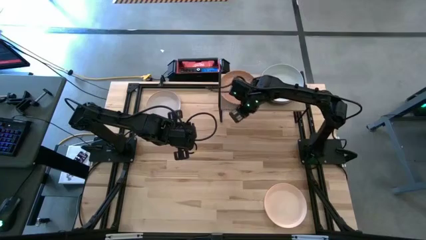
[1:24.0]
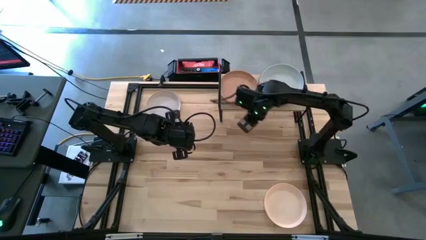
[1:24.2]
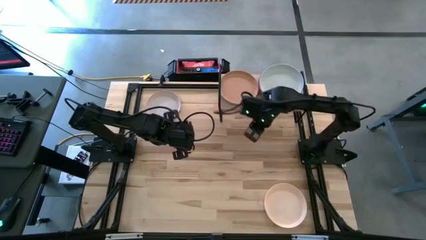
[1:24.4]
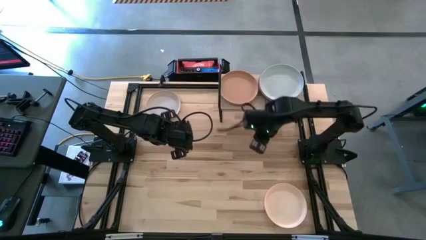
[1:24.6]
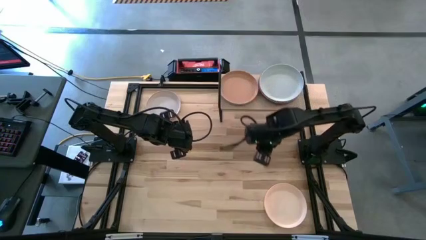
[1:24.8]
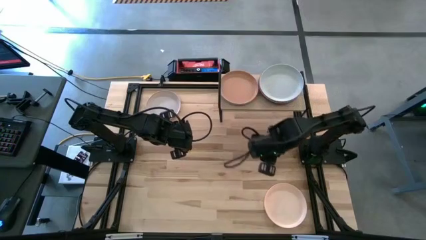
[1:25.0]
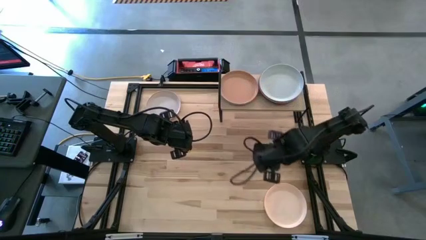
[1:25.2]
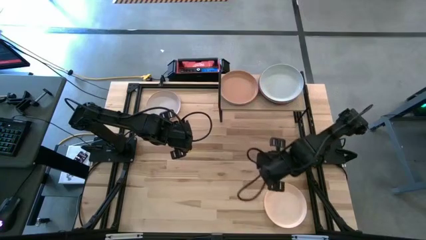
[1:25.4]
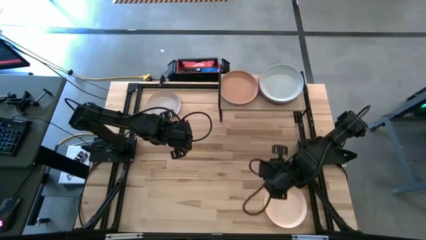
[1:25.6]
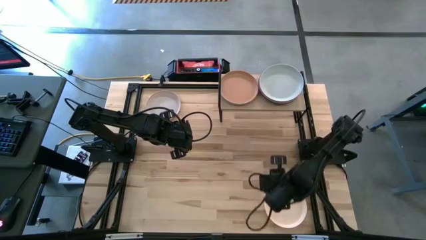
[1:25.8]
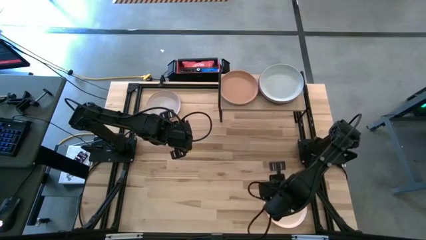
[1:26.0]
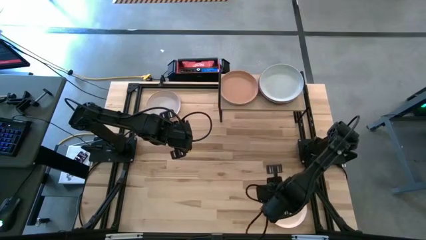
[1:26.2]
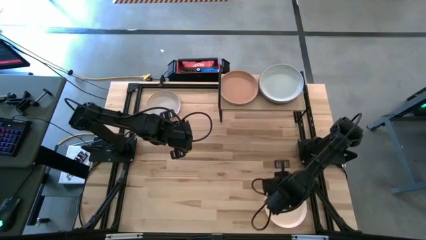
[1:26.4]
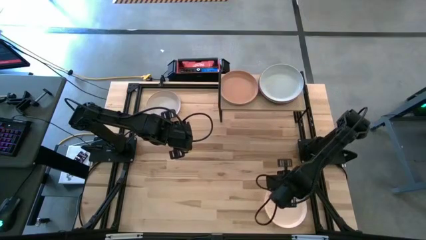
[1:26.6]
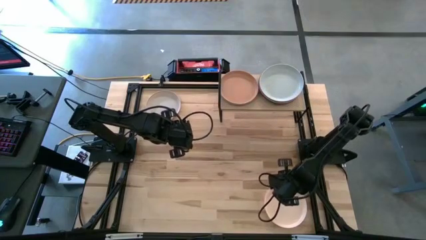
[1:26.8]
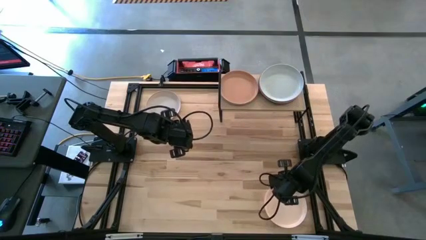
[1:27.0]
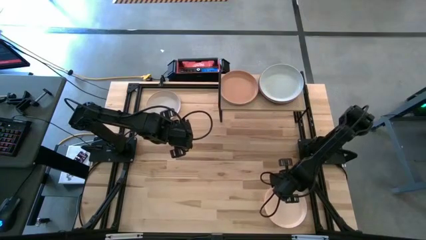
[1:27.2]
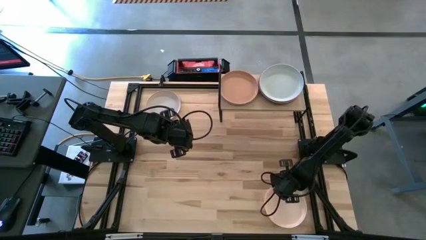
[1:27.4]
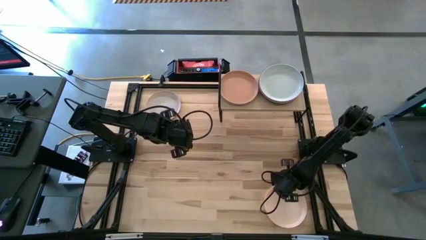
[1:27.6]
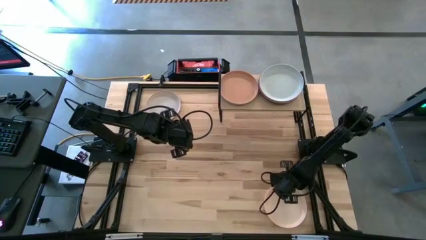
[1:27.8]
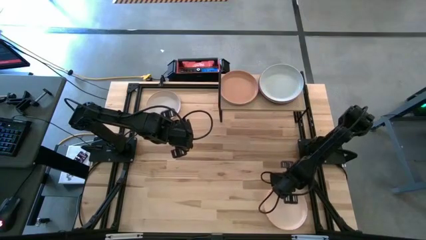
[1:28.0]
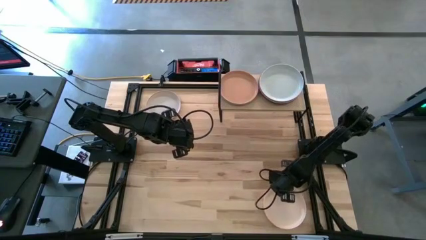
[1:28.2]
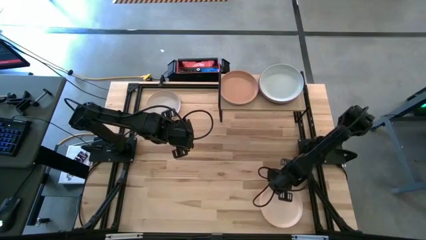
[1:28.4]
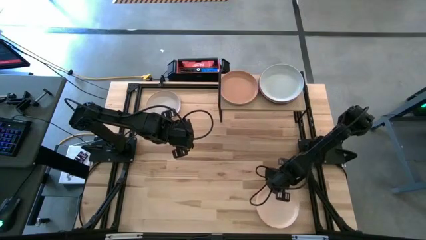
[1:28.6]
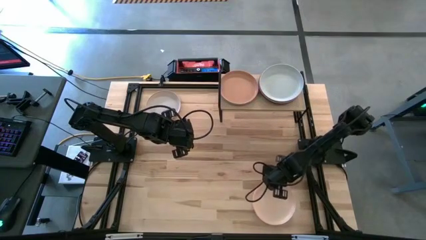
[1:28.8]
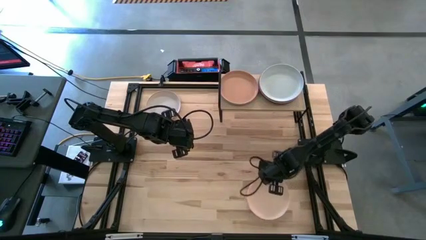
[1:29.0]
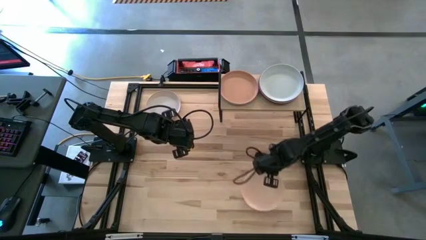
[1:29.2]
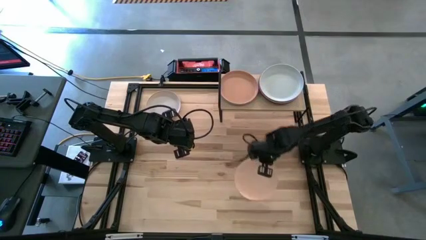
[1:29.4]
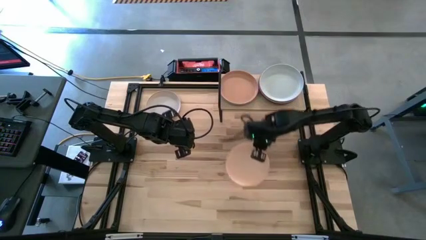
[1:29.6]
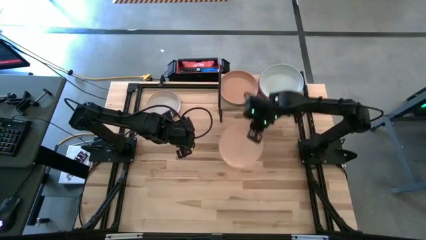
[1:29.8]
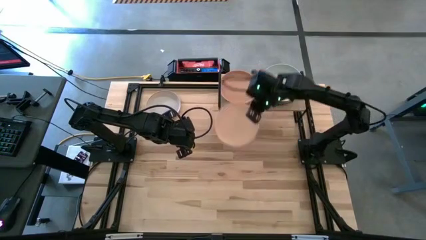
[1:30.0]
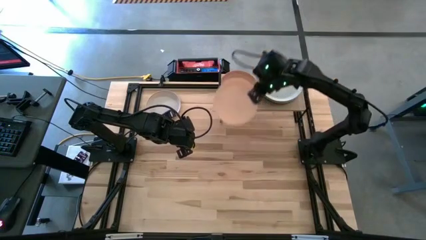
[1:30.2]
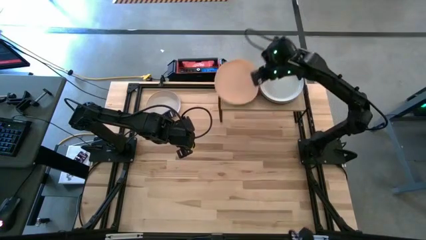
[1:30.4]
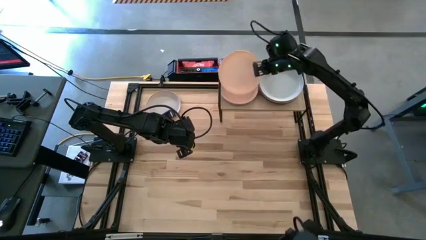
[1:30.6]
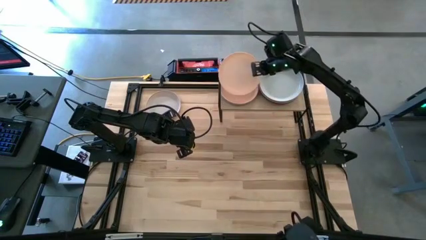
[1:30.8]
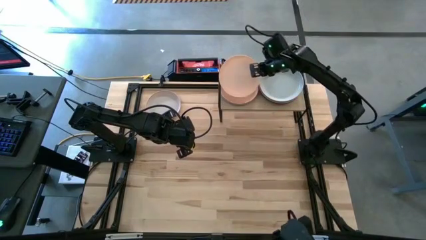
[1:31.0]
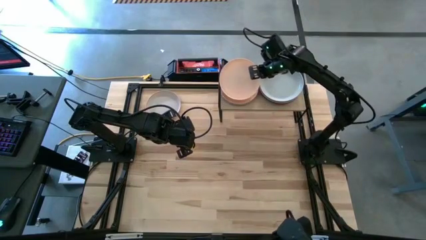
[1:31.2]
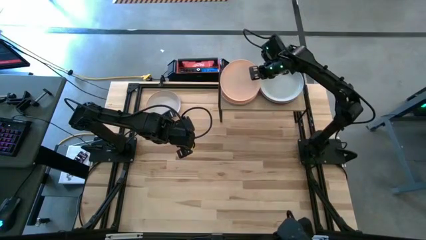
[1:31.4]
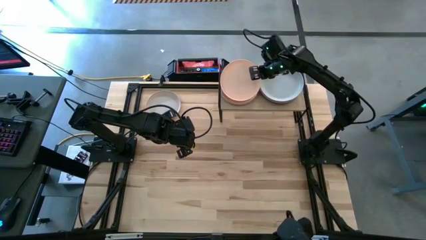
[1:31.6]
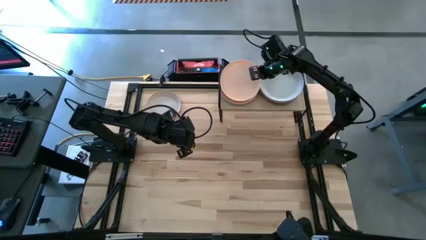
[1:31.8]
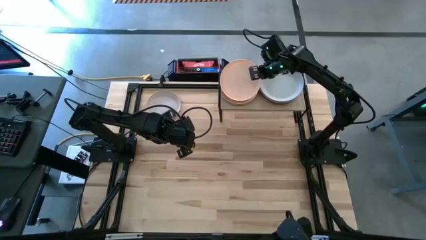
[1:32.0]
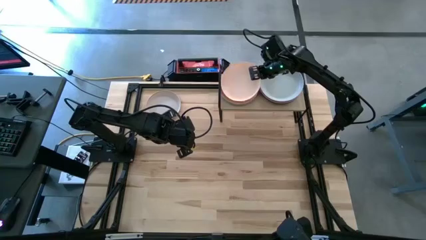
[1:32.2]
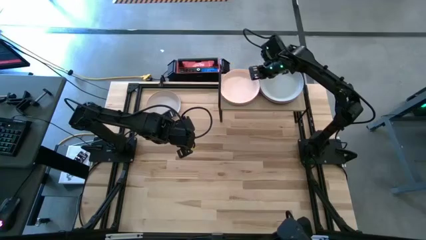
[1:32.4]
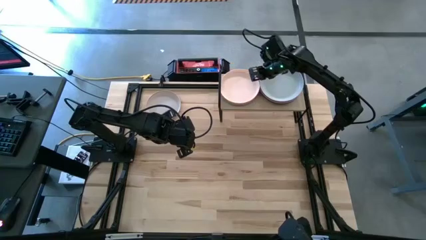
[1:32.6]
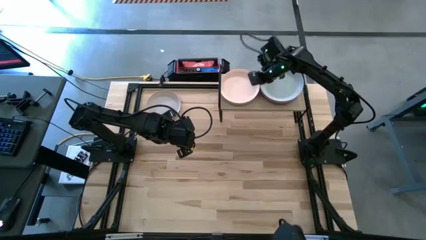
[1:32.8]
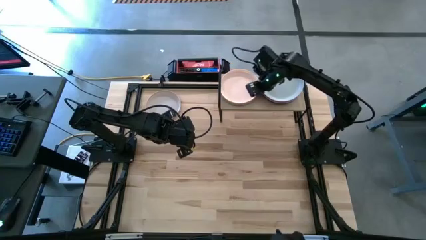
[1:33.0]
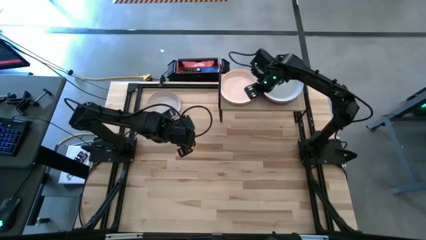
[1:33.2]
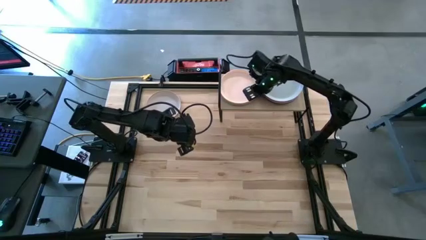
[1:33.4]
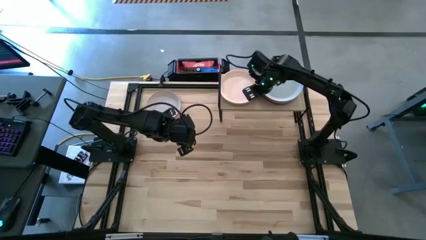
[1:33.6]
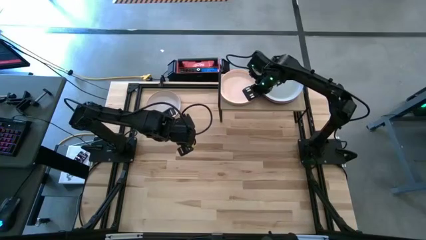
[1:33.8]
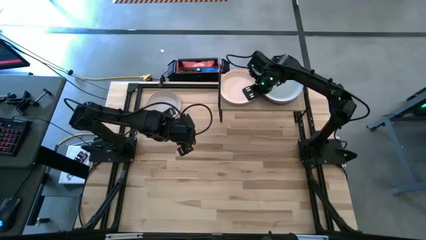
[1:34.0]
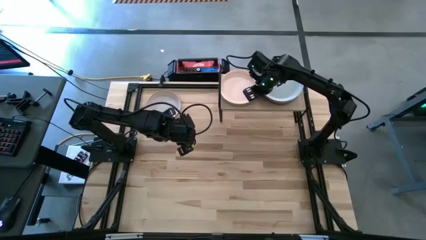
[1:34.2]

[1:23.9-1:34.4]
Task: Place and stack plates onto a shelf
Stack the light brown plate on top of the brown plate on the shelf

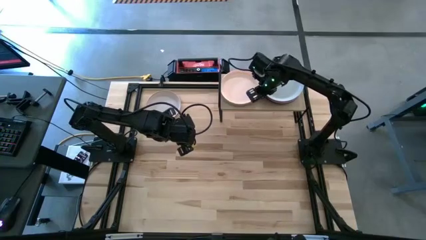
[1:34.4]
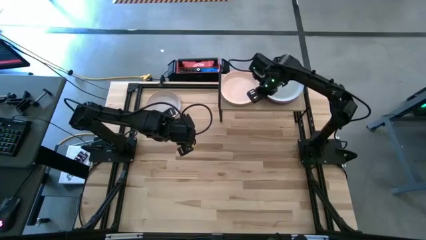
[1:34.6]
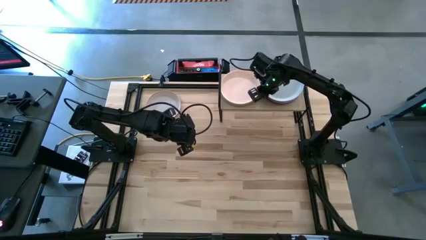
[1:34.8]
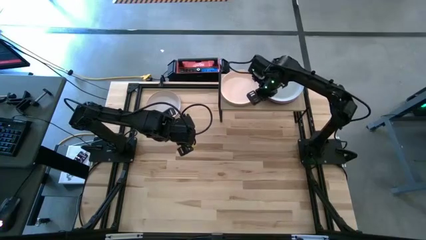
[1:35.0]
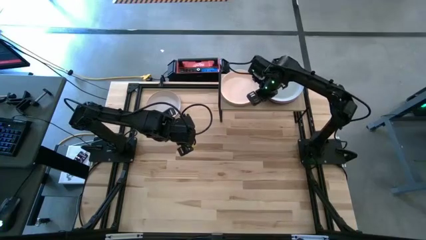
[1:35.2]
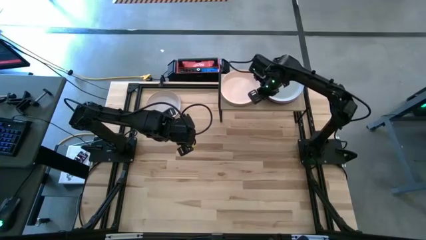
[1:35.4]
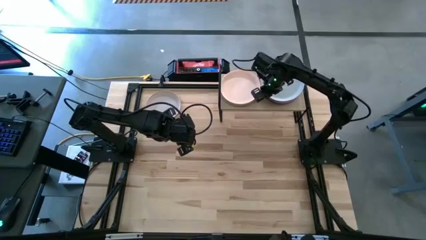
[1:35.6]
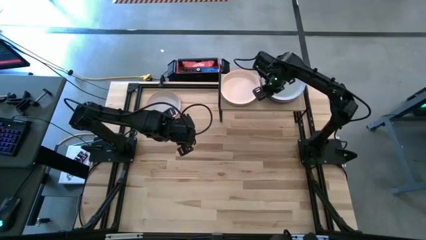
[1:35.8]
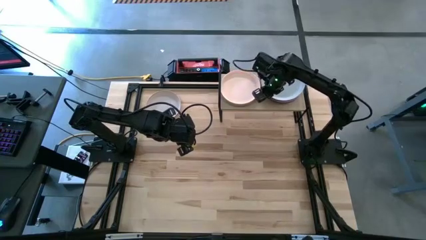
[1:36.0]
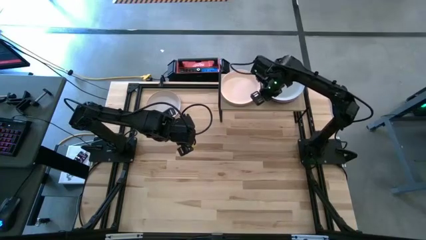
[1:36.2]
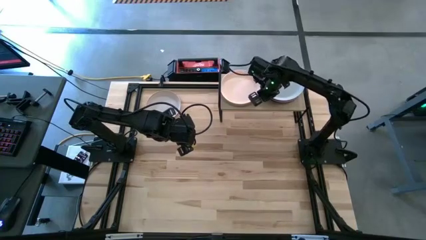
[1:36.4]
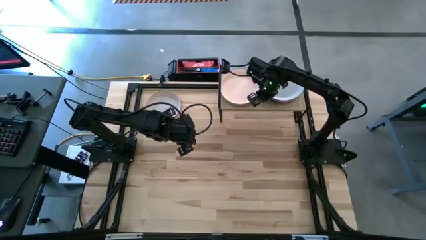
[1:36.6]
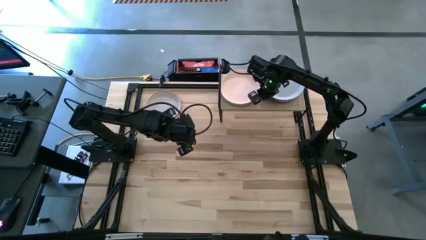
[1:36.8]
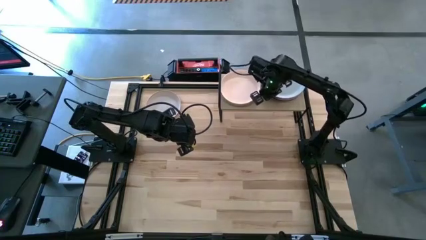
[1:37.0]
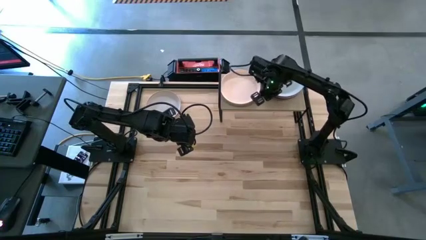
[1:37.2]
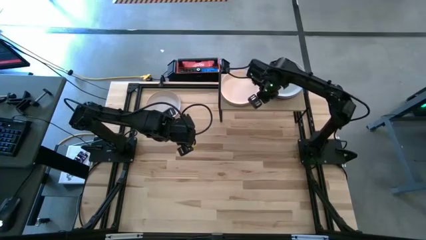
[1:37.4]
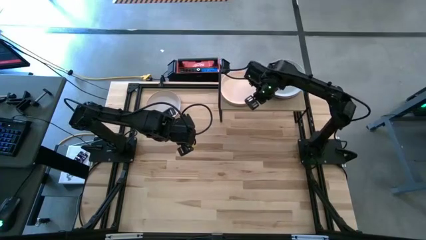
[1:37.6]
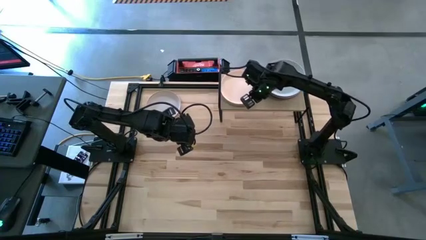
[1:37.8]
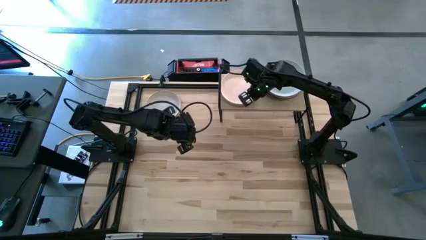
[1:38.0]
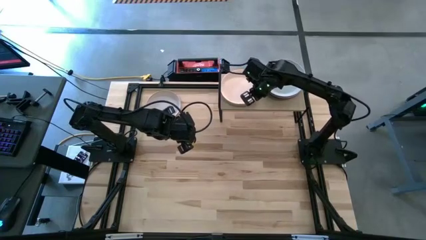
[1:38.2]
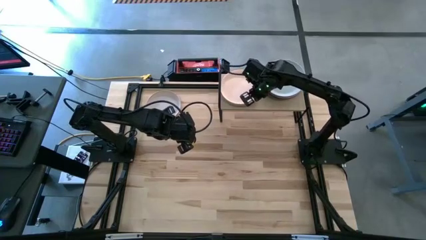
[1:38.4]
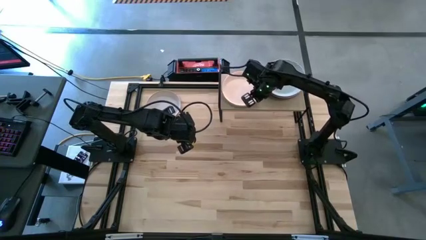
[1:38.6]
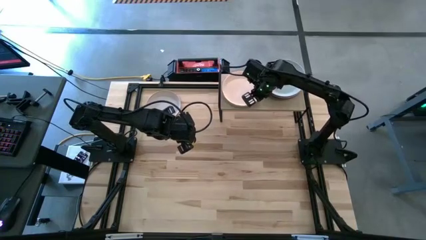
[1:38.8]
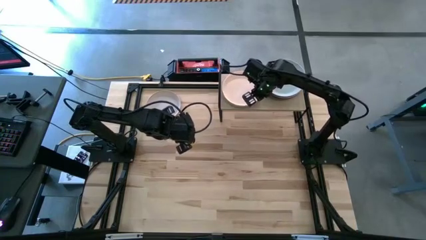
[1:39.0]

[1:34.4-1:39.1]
Adjust the right stacked plates
